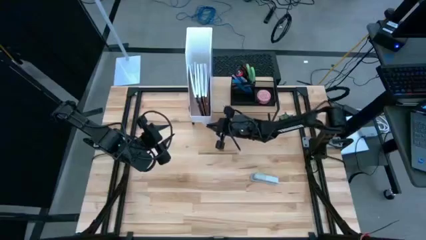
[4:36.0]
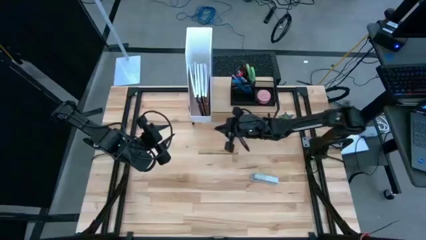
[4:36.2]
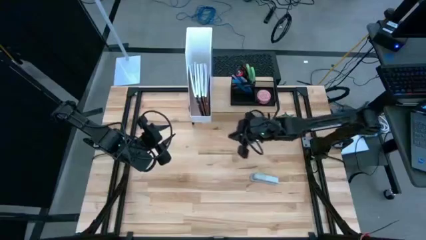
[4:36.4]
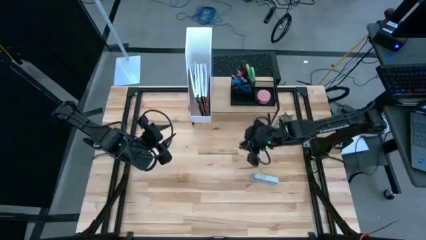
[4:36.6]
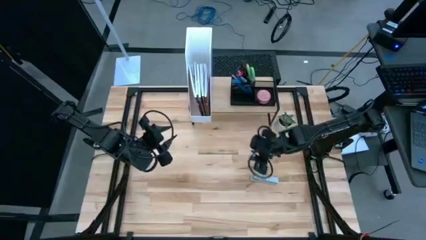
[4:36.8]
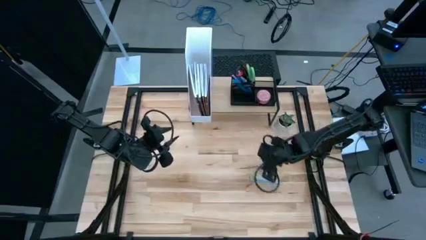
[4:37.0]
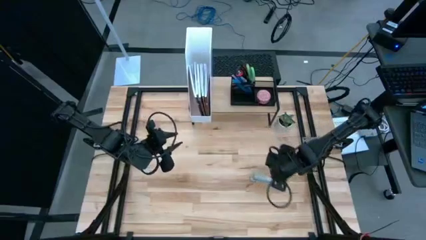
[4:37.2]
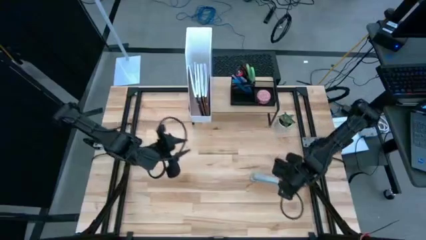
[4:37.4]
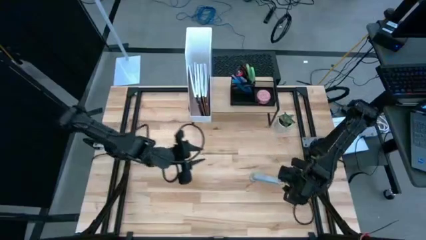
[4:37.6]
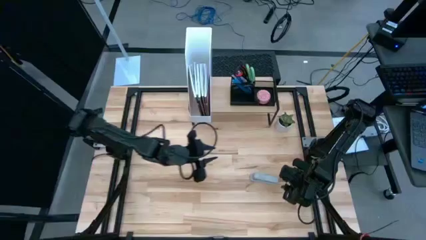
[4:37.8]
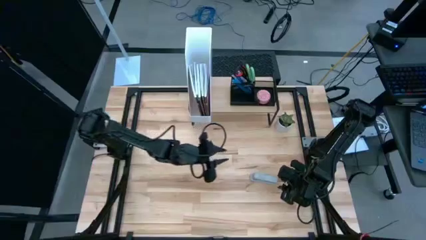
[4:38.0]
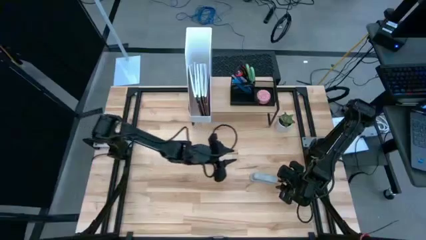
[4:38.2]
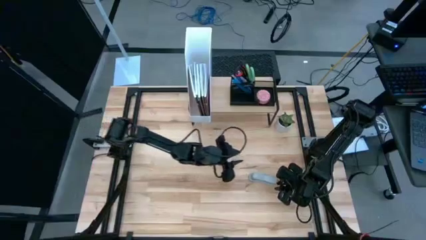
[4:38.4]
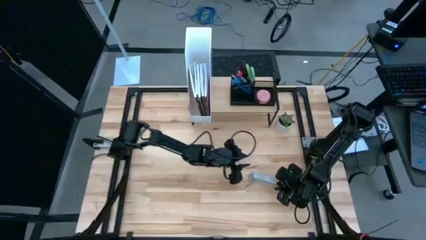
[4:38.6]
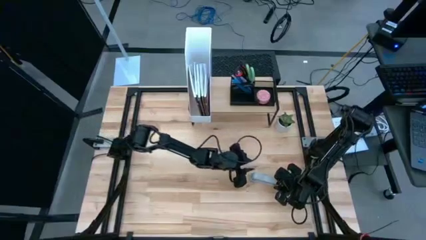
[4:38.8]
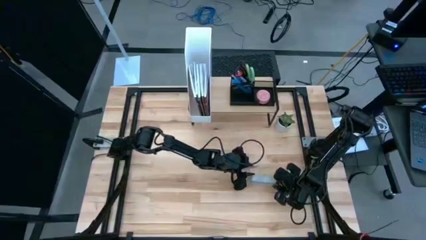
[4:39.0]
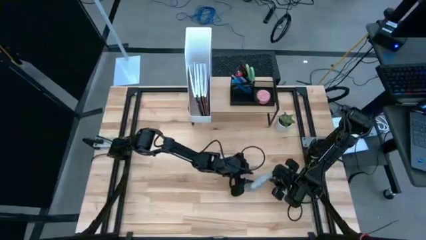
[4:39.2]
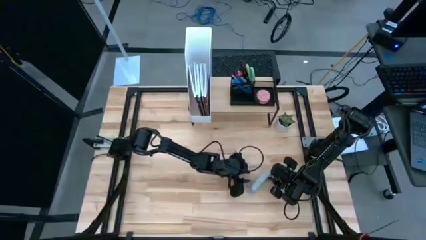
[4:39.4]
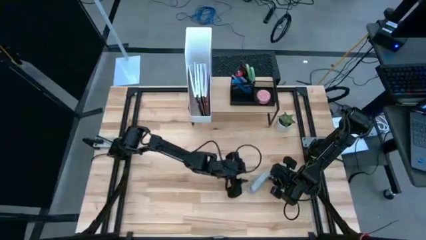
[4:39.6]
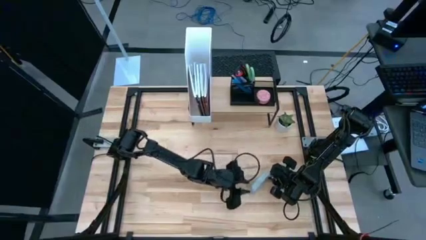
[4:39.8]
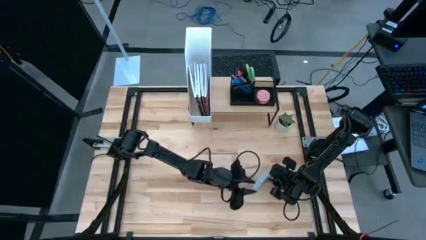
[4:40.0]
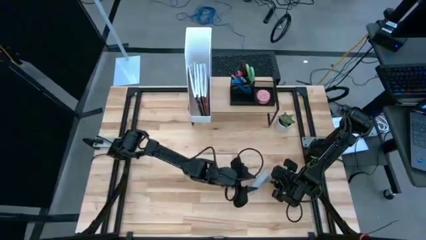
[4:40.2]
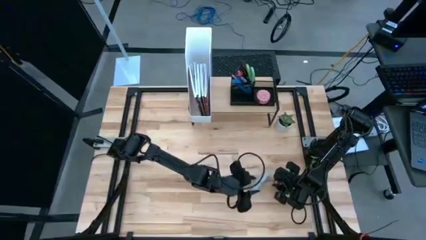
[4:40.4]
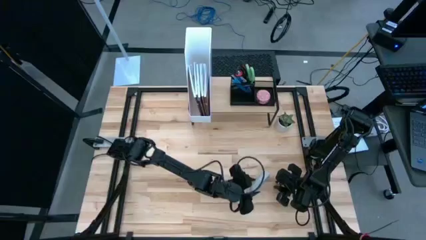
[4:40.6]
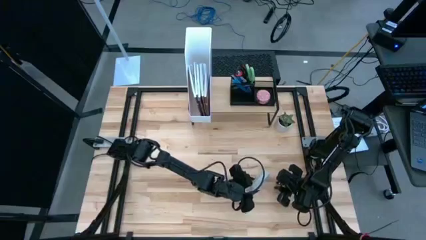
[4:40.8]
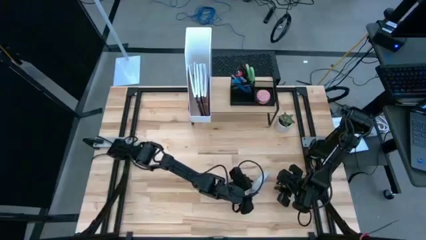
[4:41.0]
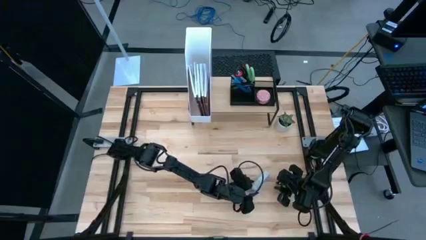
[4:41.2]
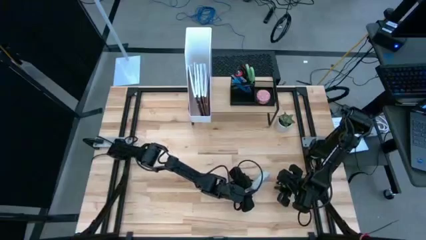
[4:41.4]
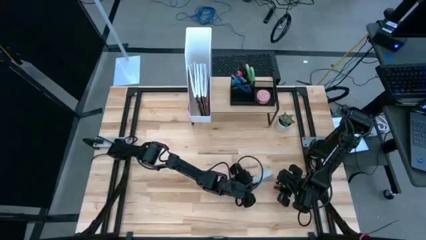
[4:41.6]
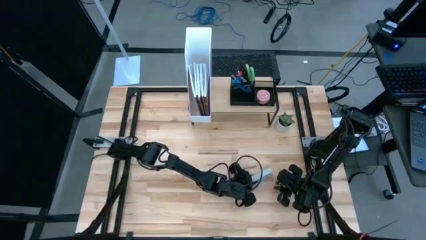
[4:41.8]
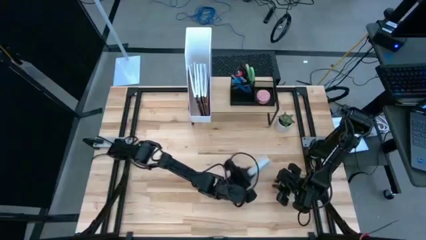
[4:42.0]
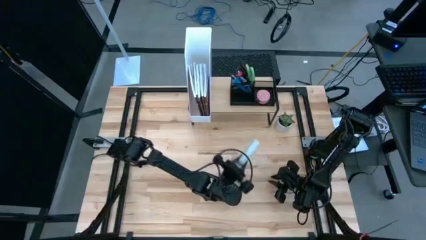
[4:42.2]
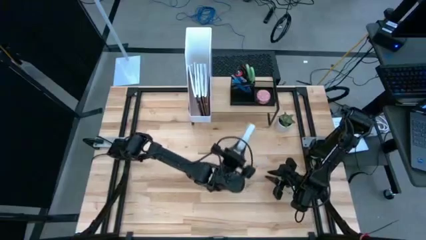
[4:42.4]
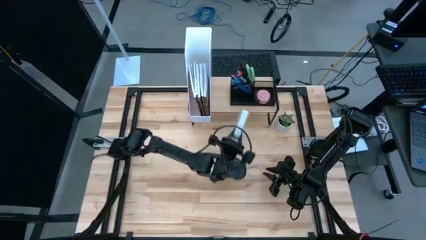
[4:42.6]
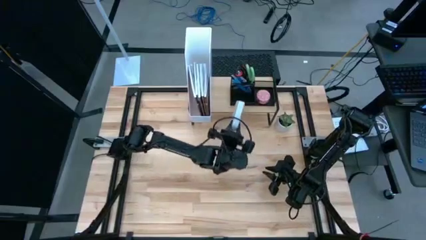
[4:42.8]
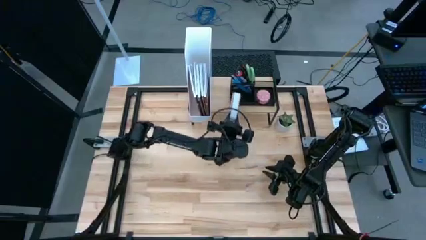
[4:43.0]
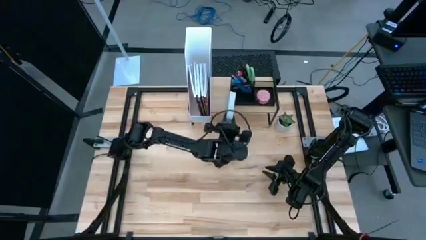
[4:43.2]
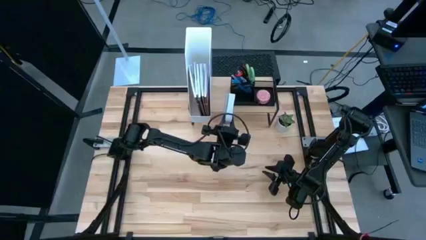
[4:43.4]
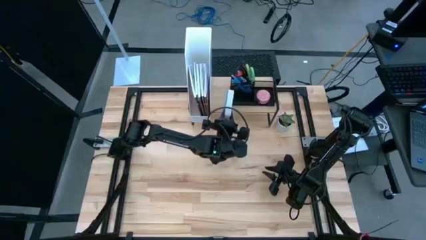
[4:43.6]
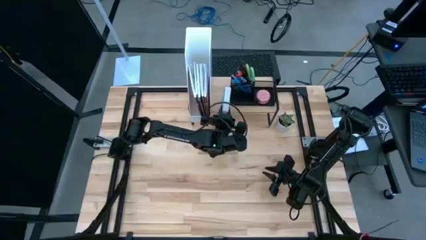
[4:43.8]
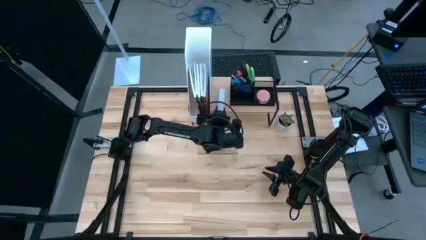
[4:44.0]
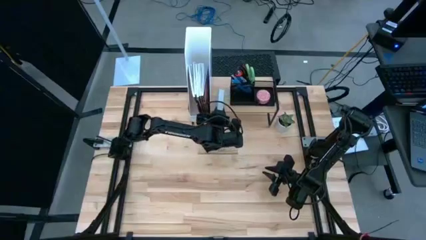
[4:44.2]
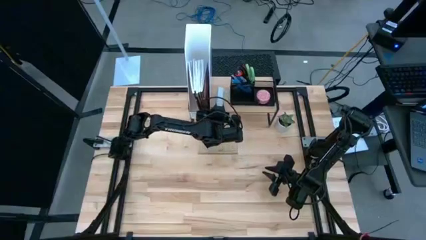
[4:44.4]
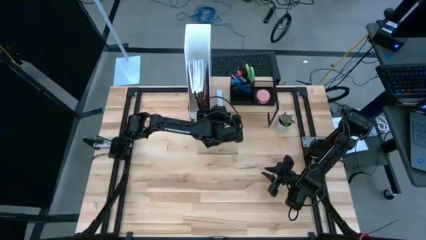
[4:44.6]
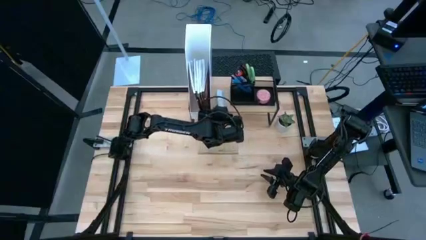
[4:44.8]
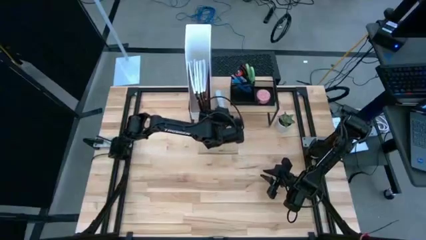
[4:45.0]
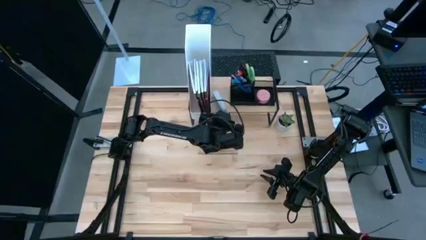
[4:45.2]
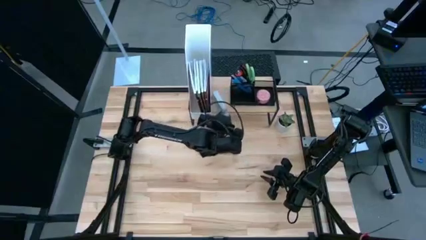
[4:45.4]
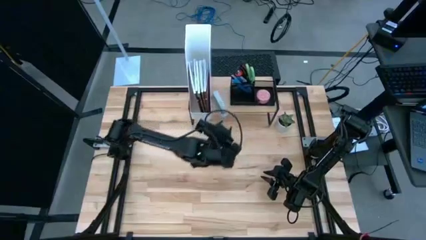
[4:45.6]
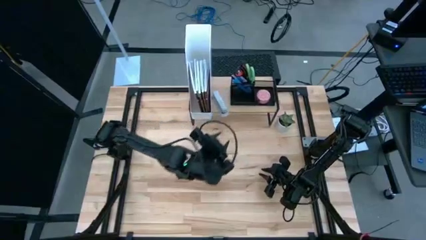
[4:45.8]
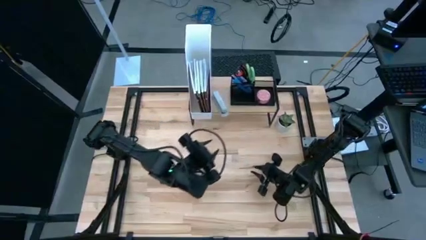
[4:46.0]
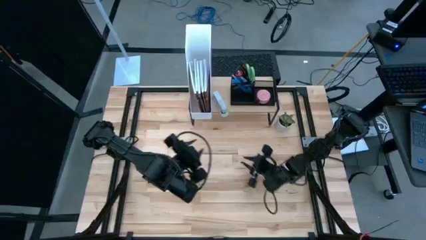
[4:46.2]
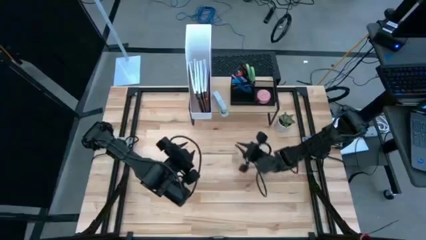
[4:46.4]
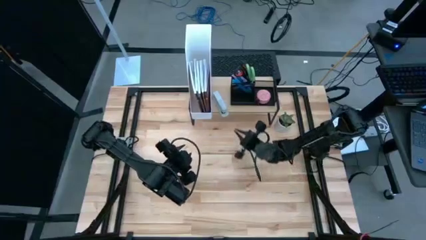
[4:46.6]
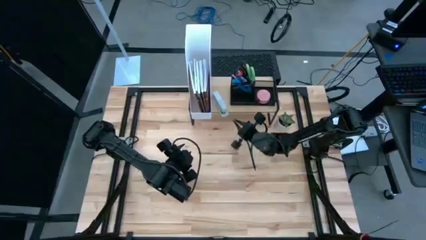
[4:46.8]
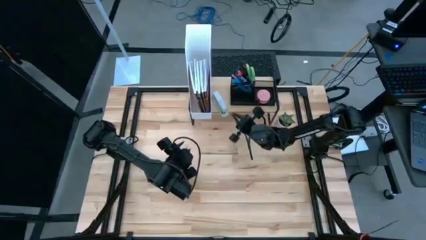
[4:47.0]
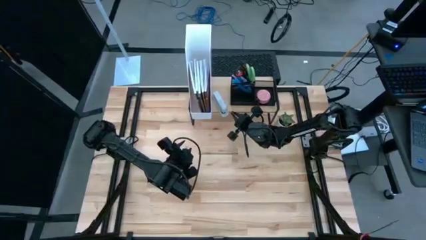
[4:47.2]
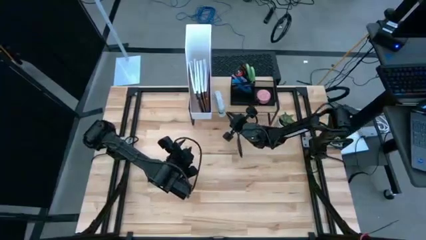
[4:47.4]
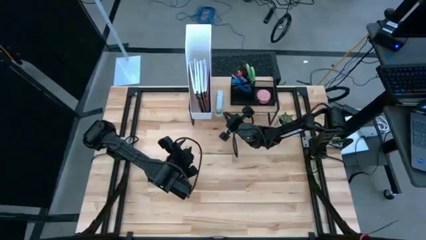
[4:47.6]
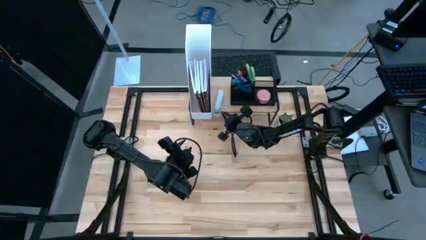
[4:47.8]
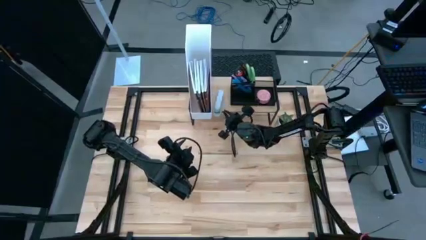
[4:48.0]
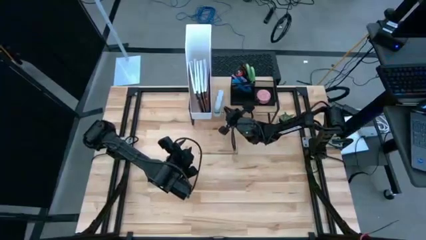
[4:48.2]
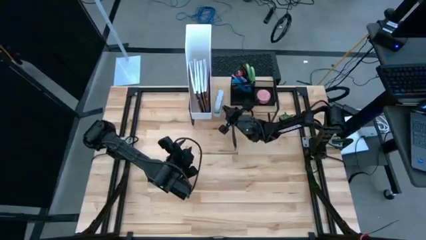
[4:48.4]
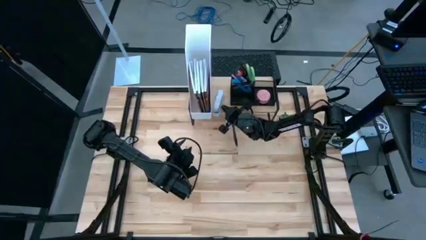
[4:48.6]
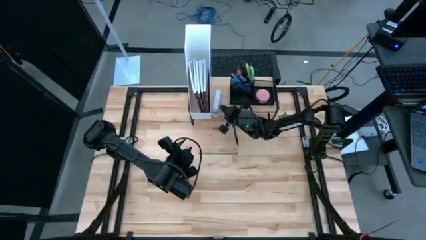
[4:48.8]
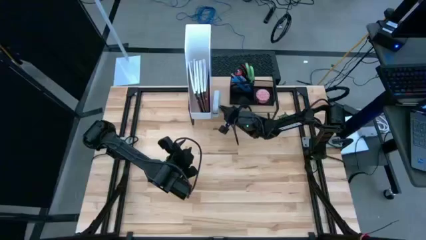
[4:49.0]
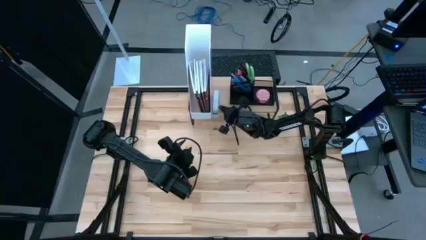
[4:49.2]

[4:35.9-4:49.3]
Task: Stock shelves
Put the stapler on the shelf
